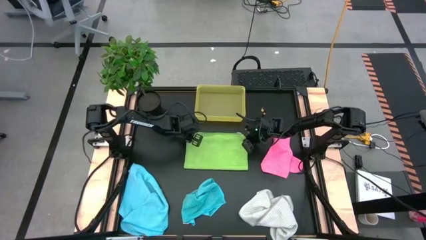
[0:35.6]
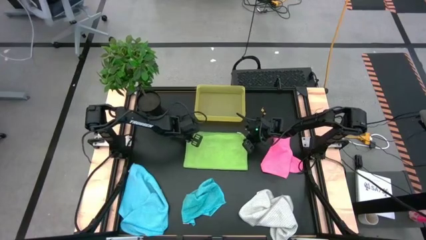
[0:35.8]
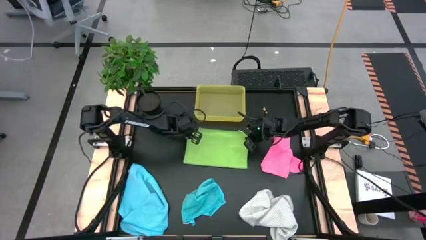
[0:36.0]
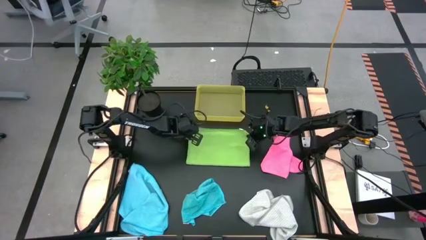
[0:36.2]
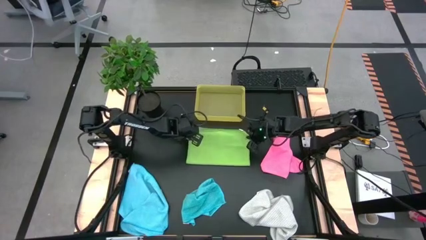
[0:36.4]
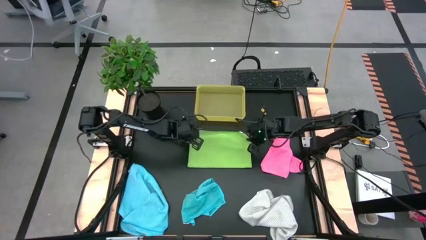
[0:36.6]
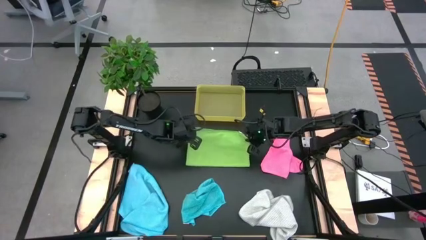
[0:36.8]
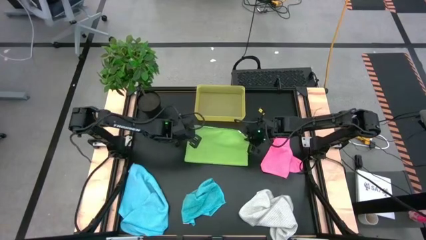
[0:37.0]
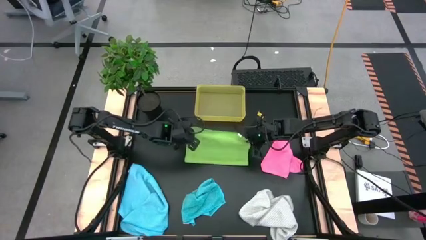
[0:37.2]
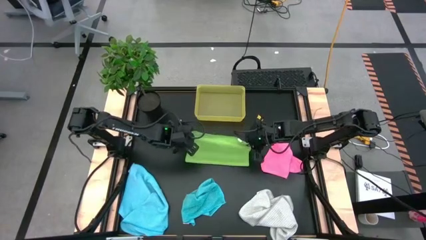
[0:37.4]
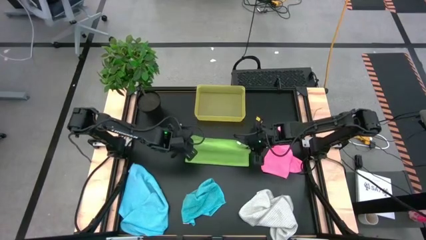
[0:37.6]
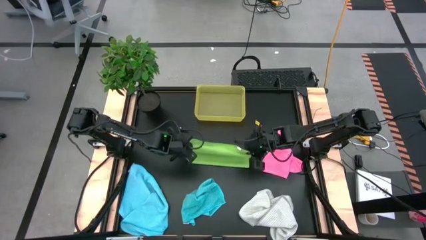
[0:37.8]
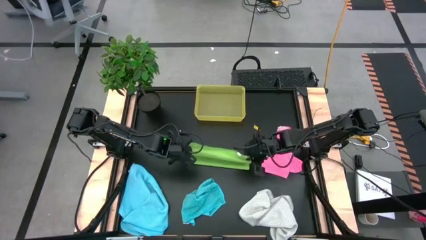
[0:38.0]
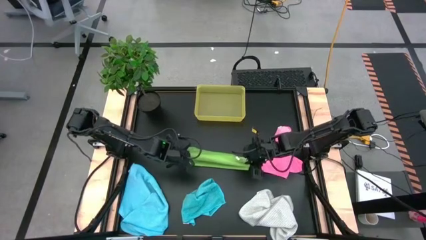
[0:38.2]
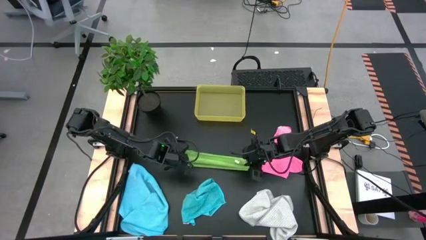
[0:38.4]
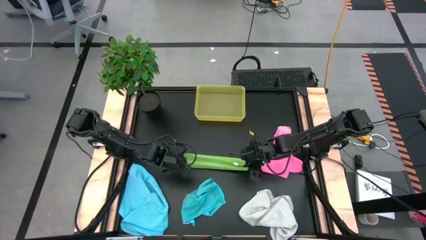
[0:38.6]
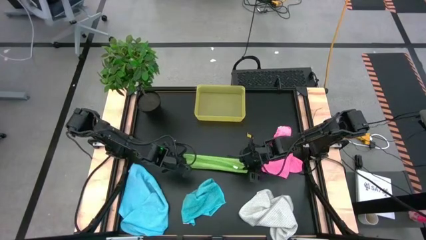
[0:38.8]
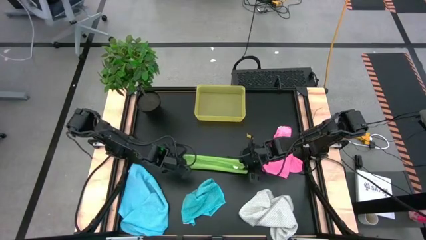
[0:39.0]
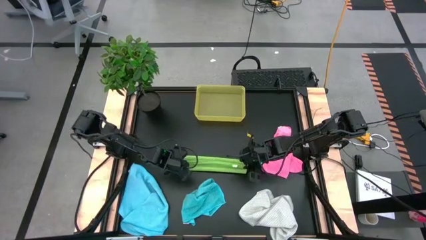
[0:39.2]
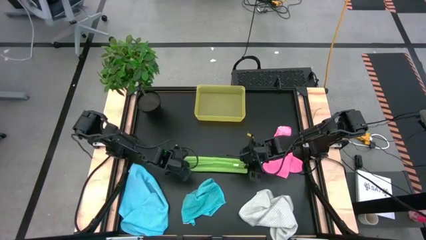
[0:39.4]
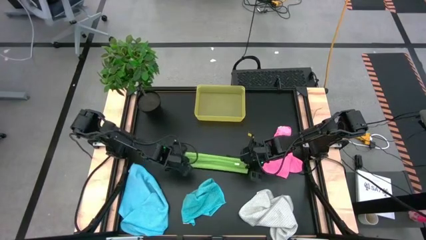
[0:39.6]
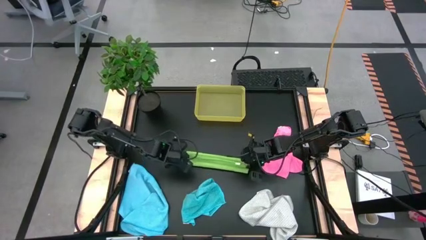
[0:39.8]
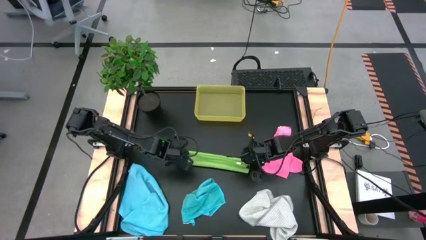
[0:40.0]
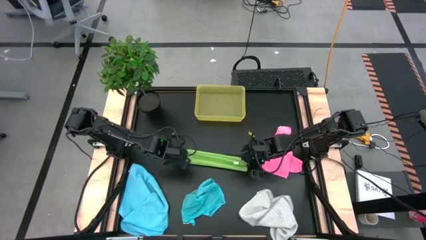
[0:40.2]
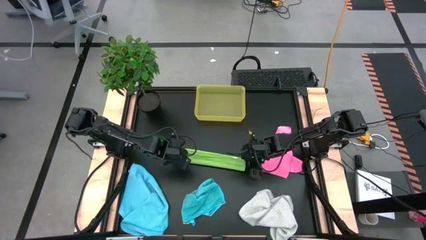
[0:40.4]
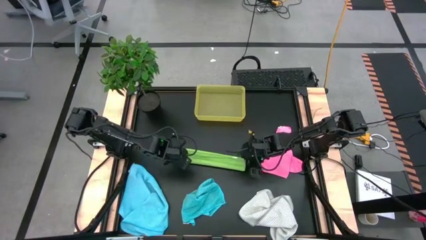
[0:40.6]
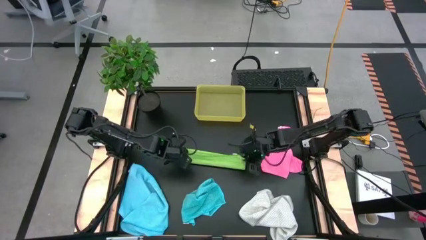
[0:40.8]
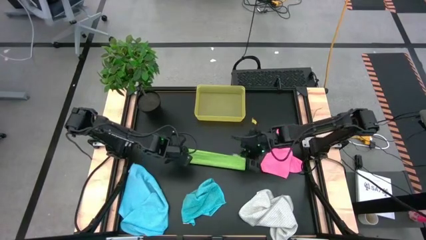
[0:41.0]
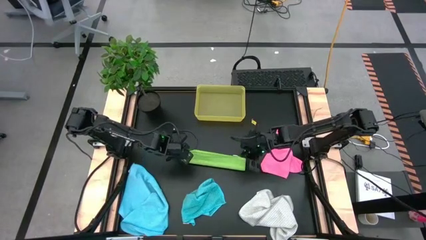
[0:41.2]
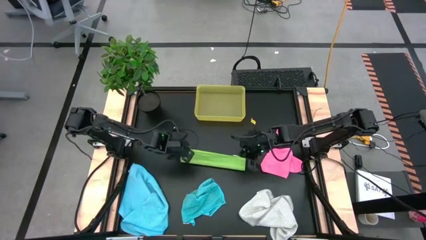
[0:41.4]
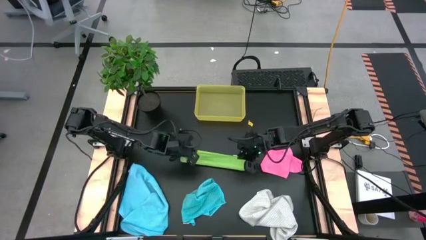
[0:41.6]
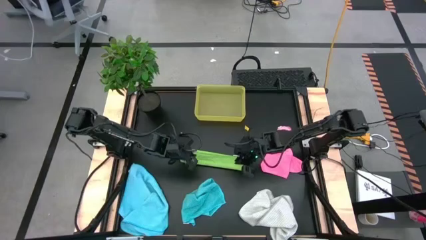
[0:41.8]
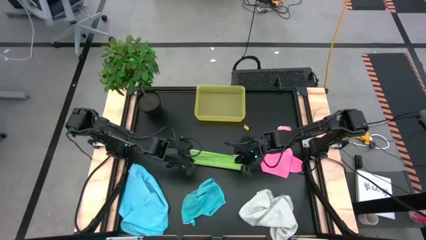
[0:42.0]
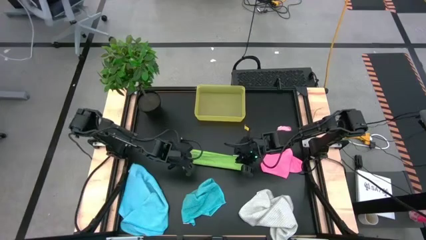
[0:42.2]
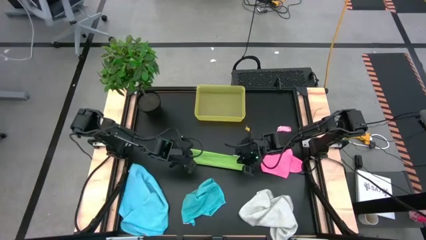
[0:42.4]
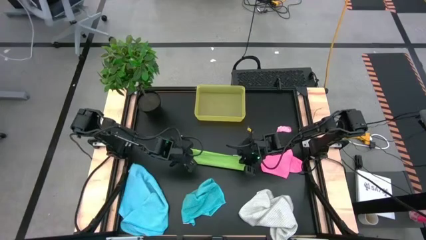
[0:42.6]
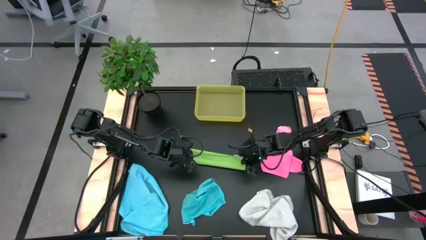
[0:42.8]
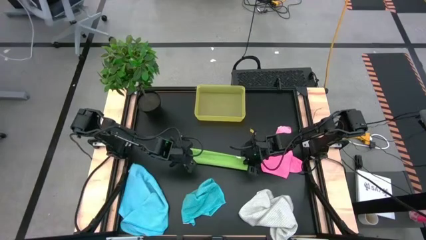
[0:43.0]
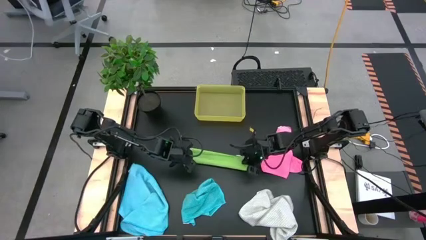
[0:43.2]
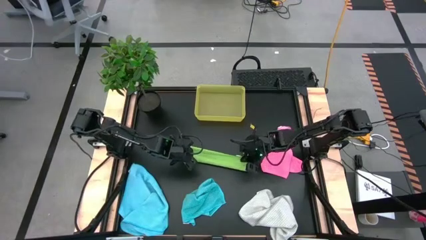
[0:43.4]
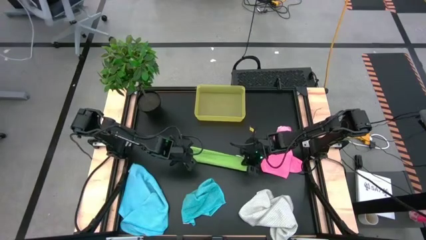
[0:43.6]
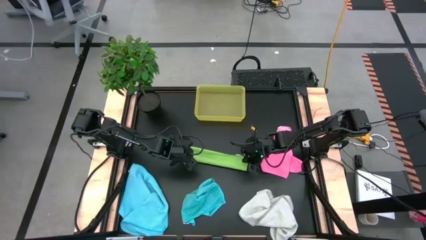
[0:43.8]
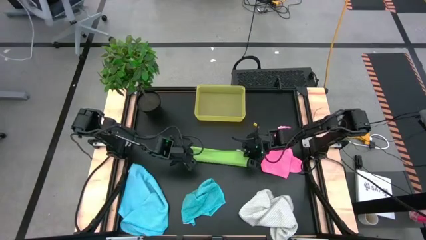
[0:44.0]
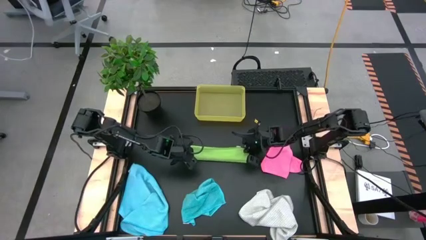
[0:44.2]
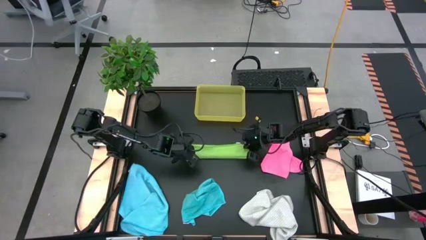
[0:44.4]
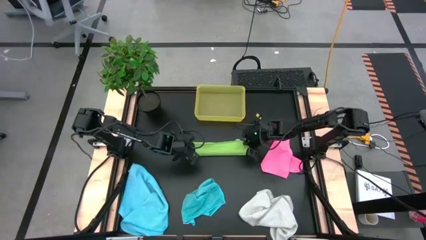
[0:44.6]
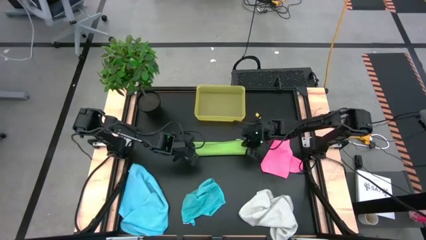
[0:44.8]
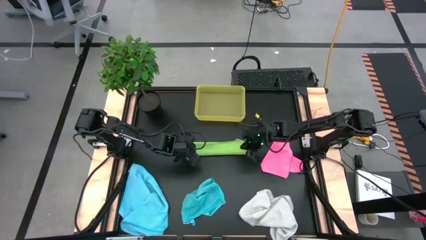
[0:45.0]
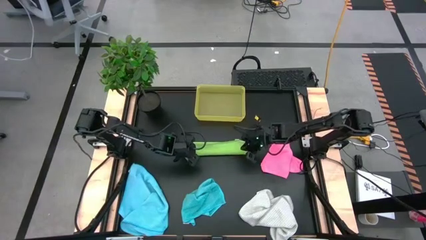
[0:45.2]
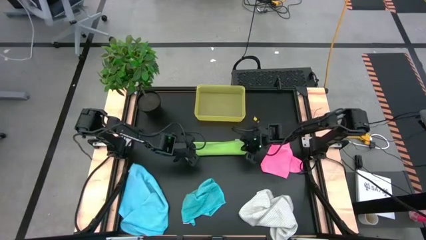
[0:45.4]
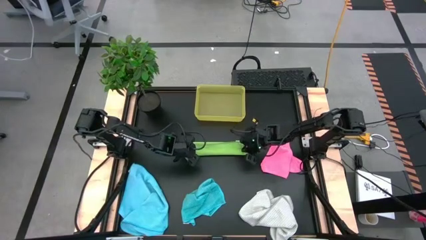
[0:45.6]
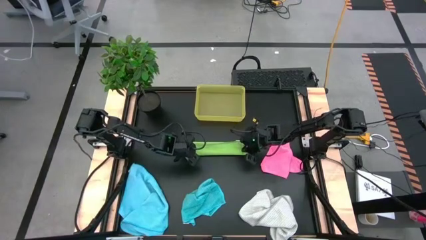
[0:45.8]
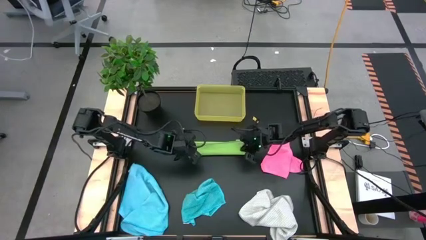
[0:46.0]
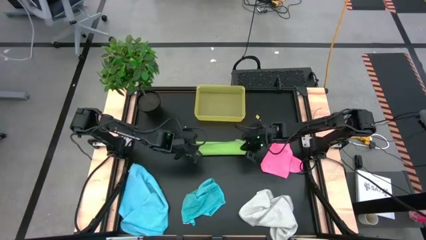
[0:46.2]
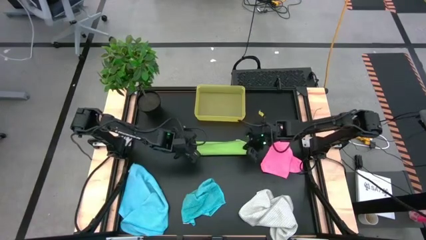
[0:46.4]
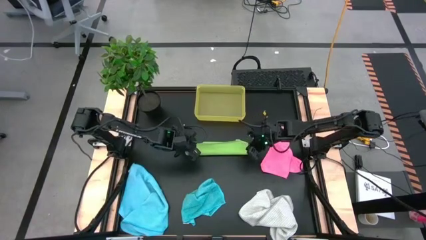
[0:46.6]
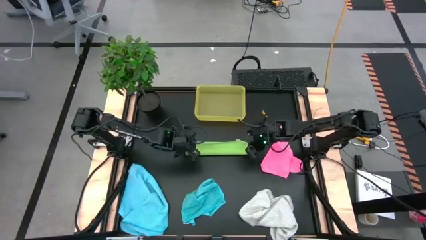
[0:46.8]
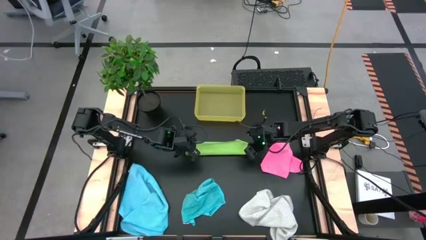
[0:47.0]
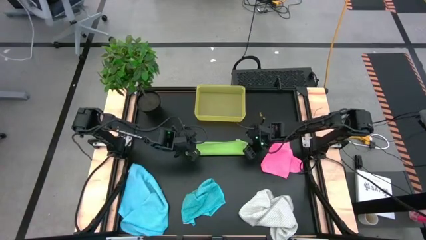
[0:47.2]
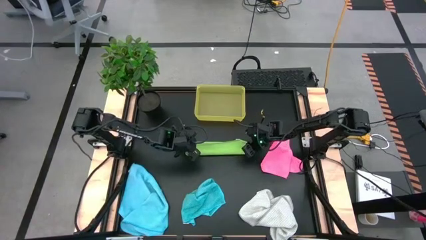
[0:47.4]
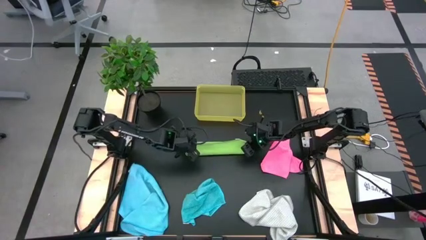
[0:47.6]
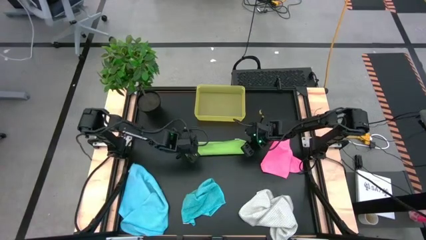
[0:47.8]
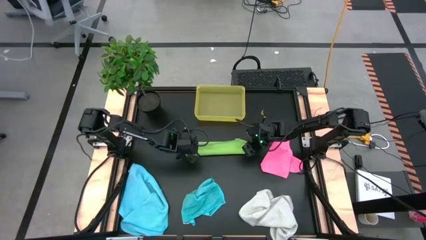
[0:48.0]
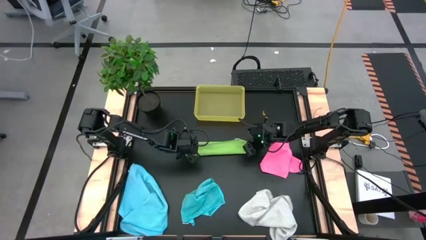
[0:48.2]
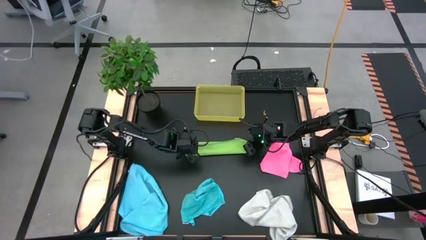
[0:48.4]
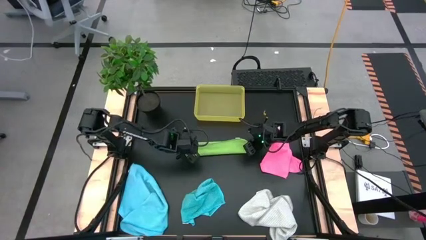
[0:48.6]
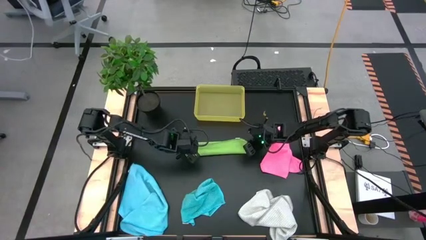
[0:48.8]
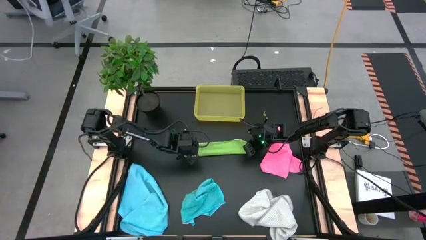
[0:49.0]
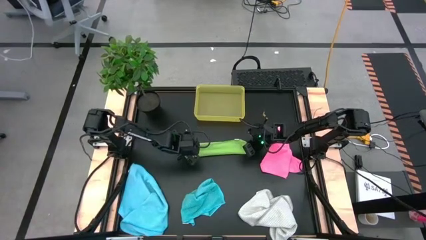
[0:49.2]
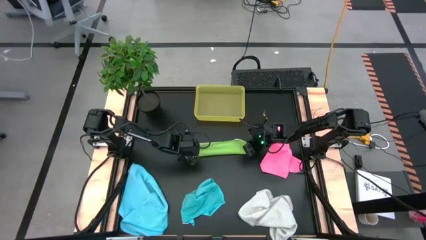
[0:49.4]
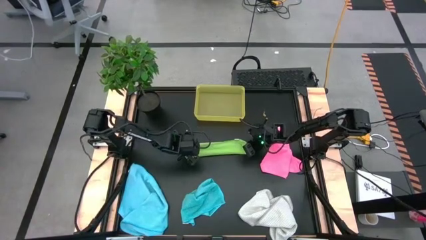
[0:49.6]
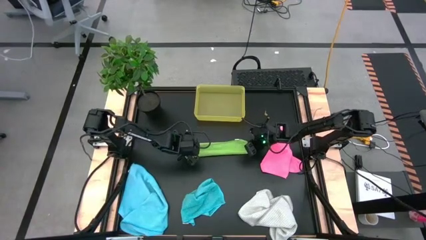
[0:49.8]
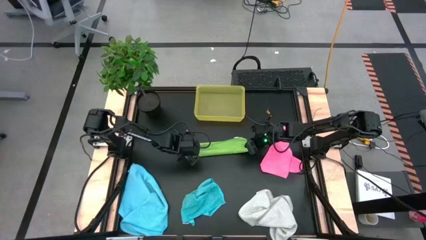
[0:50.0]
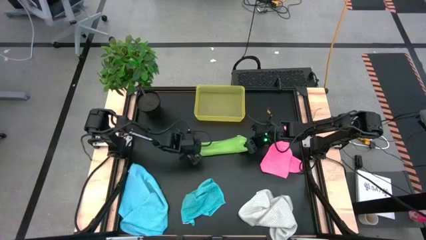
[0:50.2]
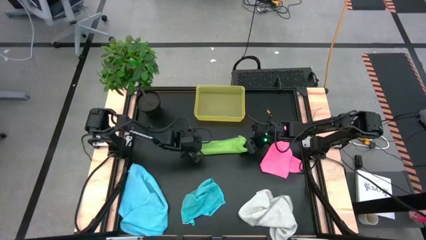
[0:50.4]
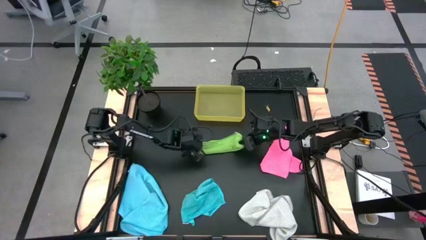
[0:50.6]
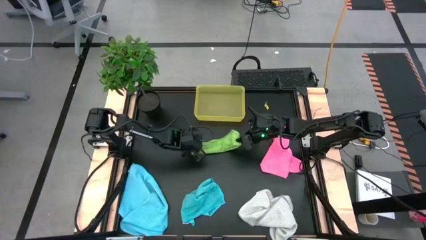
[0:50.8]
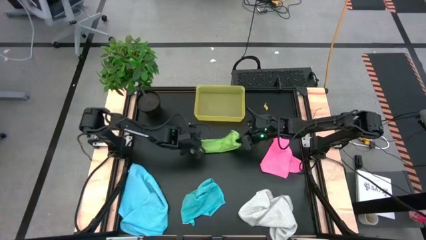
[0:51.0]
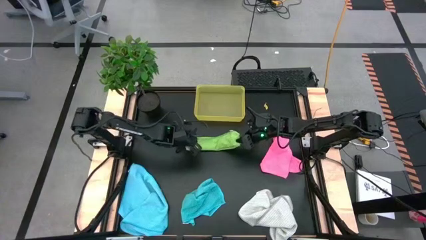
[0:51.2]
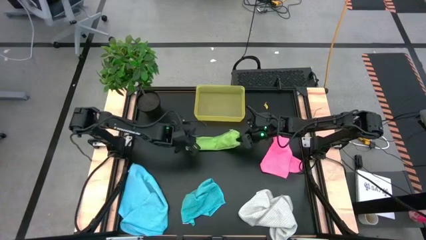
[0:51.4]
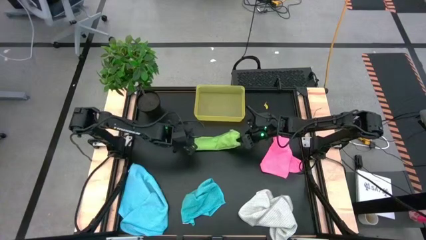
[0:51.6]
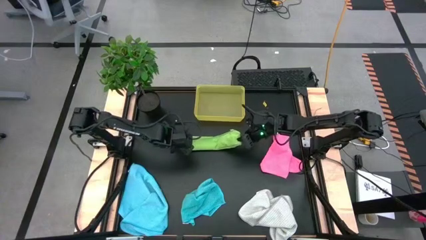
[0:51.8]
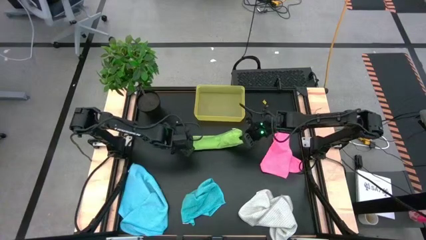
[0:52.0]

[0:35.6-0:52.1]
Task: Fold microfiber towels
Fold the green microfiber cloth
